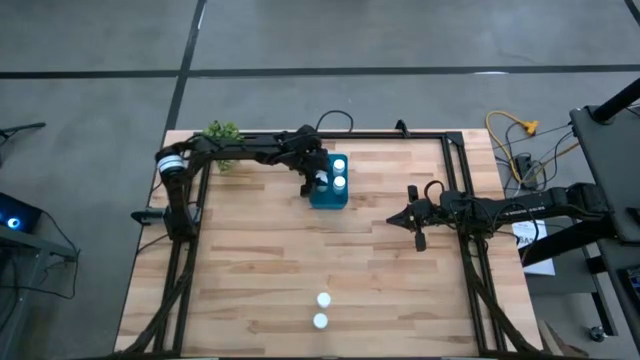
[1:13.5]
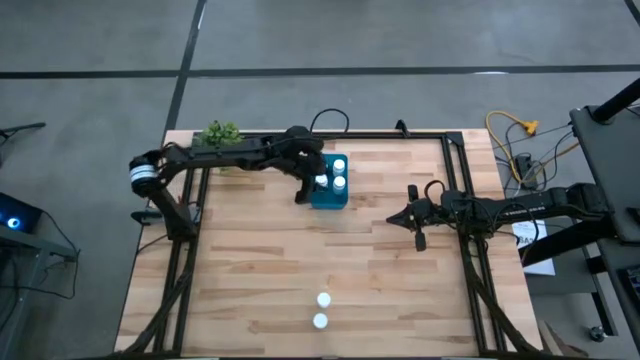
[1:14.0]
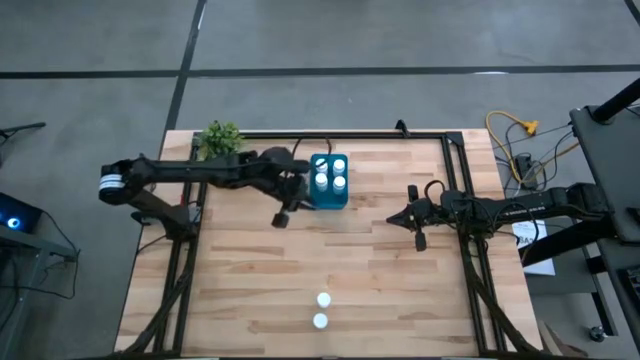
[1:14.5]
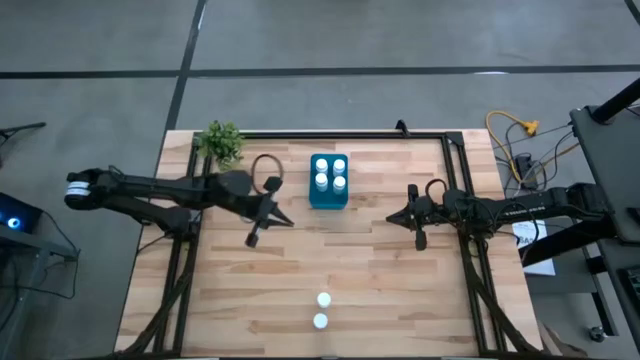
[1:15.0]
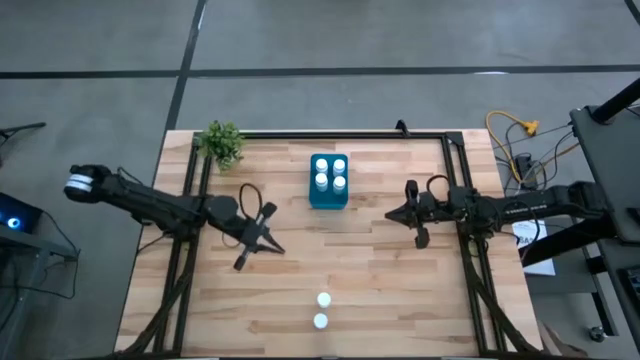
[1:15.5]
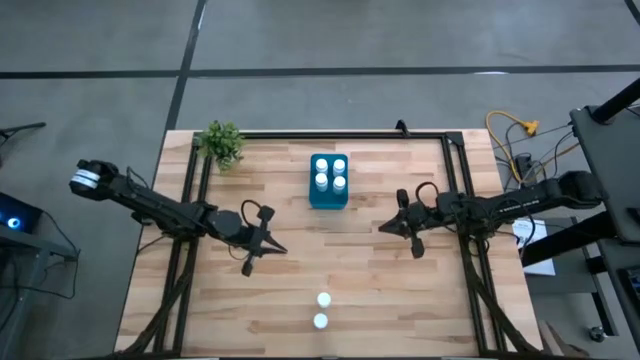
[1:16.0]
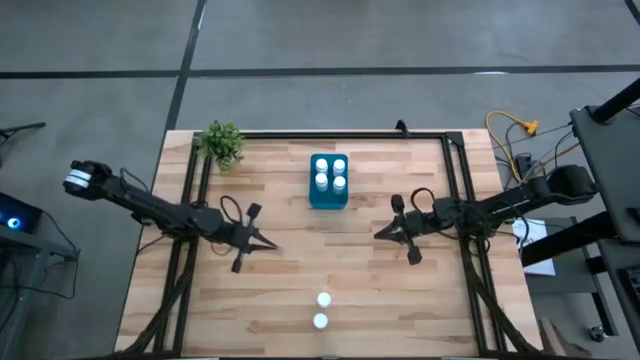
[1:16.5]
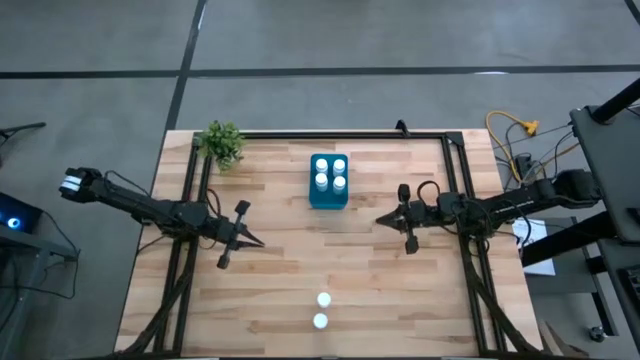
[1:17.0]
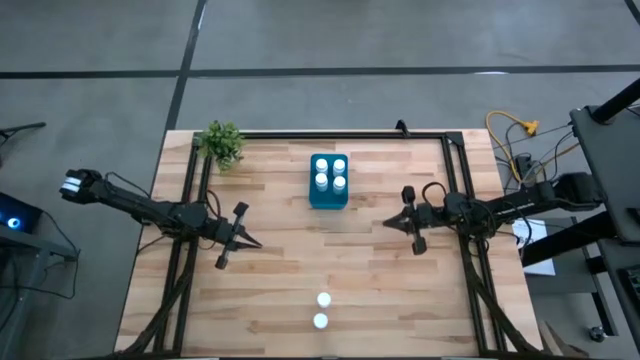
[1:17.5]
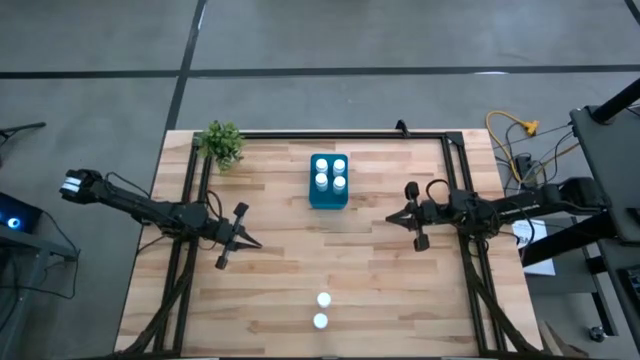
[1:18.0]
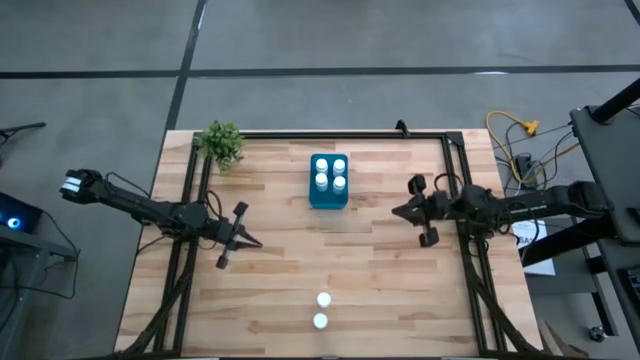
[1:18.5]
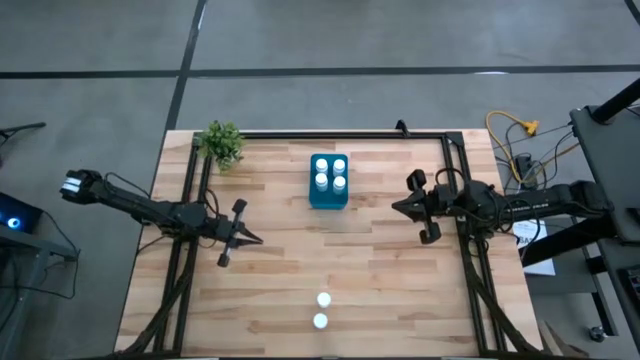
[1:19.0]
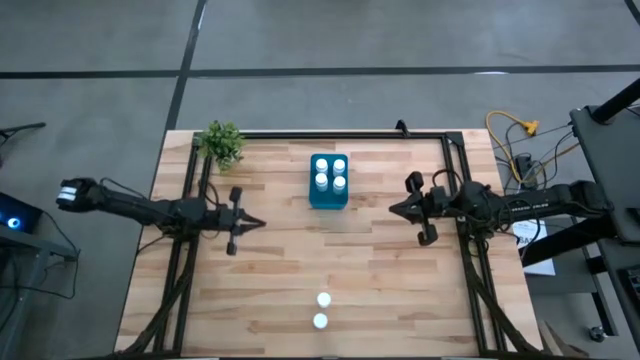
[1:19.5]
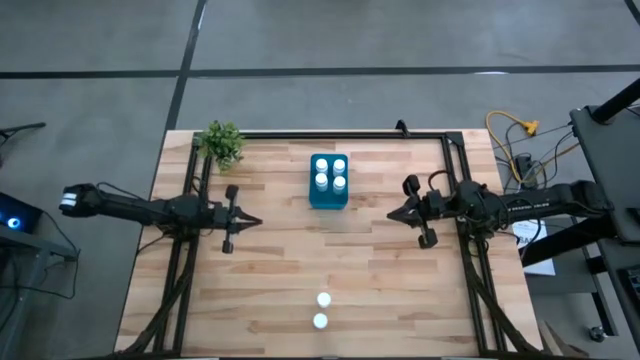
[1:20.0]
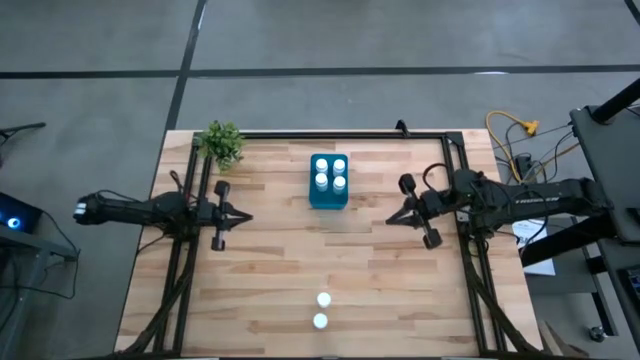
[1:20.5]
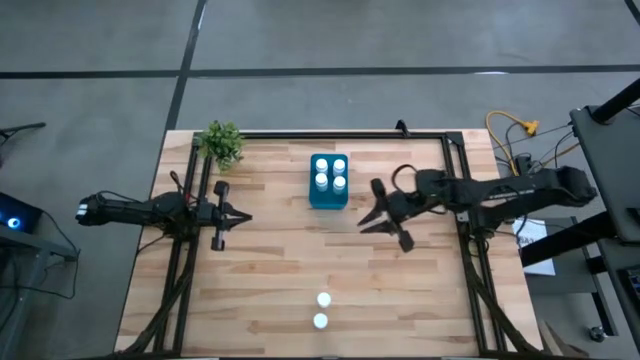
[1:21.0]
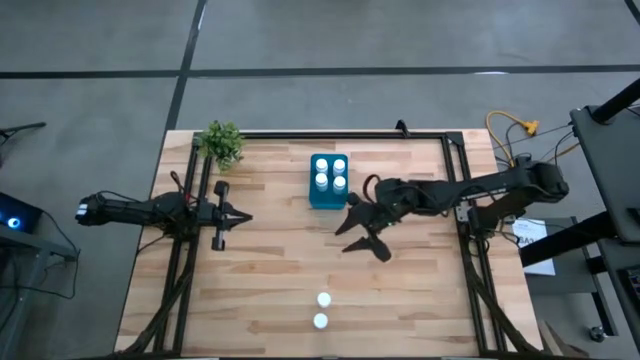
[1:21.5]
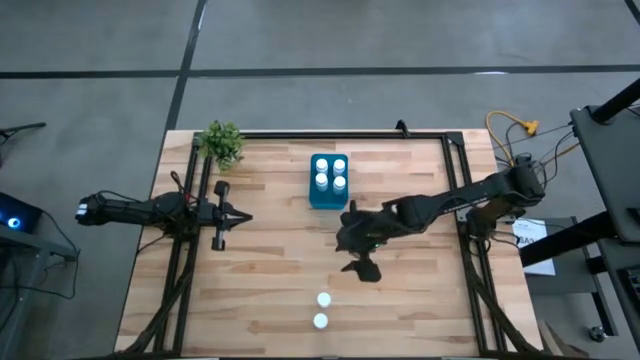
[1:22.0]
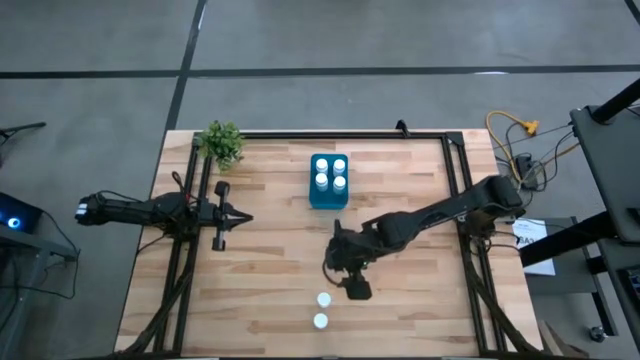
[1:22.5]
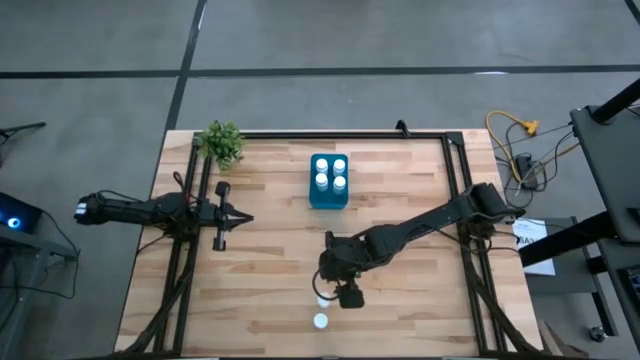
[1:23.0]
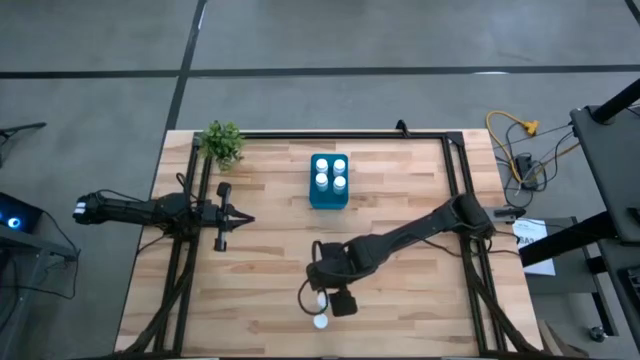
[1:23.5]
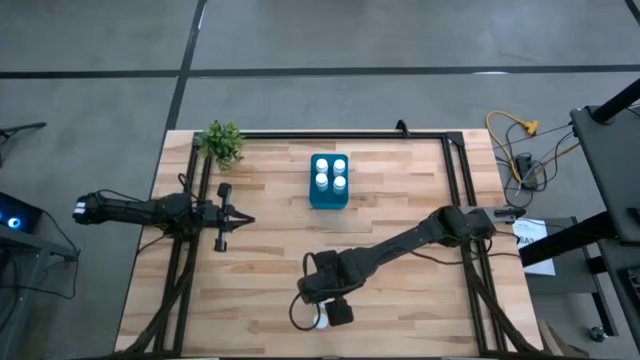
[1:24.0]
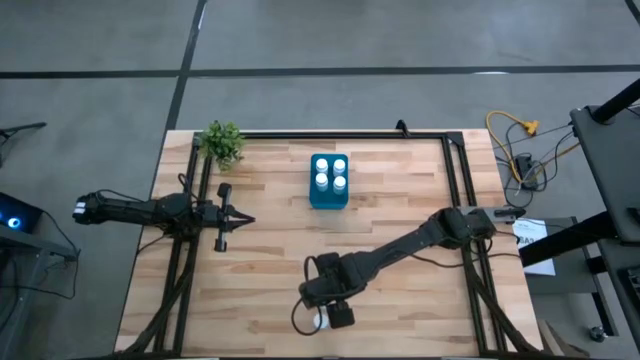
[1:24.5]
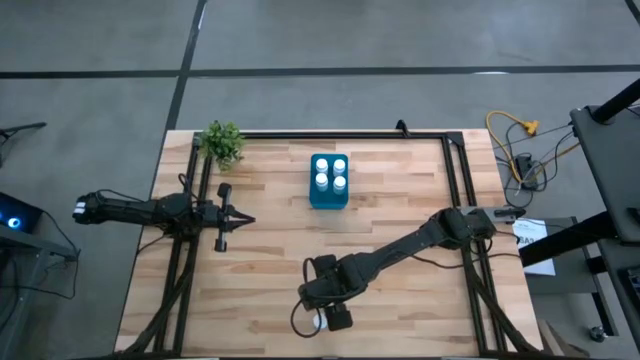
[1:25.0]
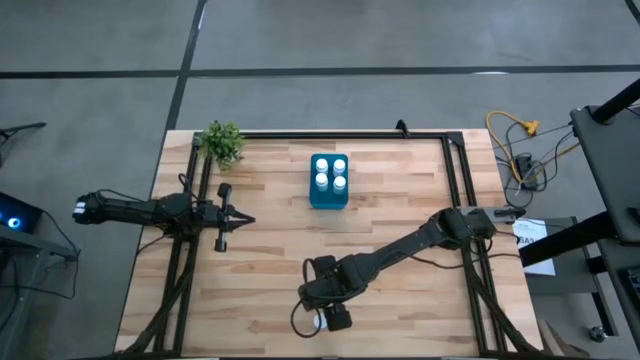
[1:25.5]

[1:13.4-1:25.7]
Task: Pick and place pill bottles into a basket
Put the top white pill bottle into the blue bin

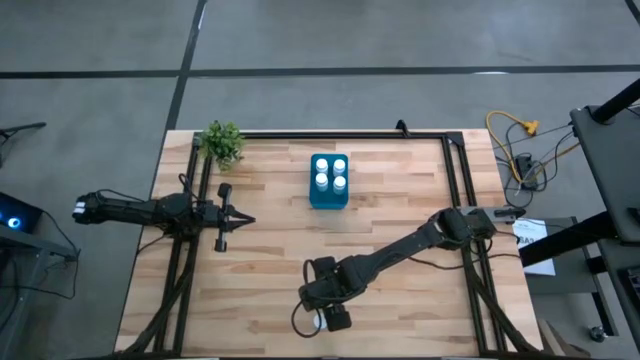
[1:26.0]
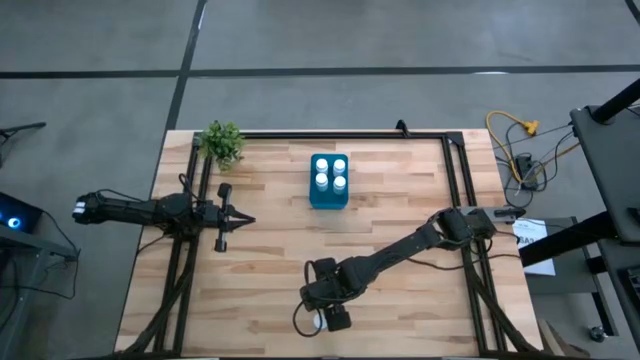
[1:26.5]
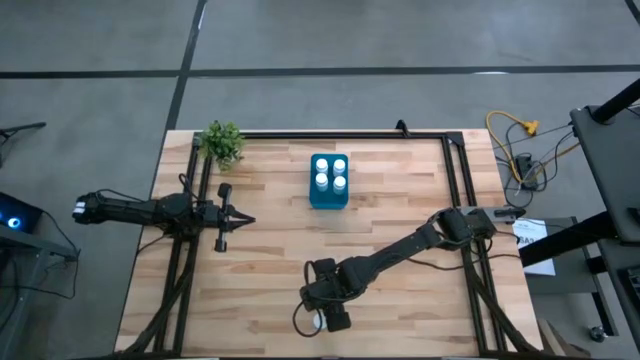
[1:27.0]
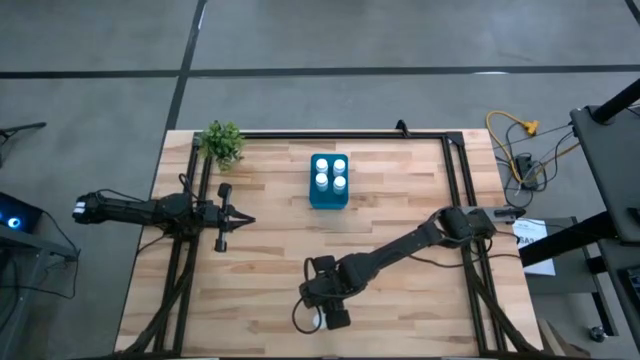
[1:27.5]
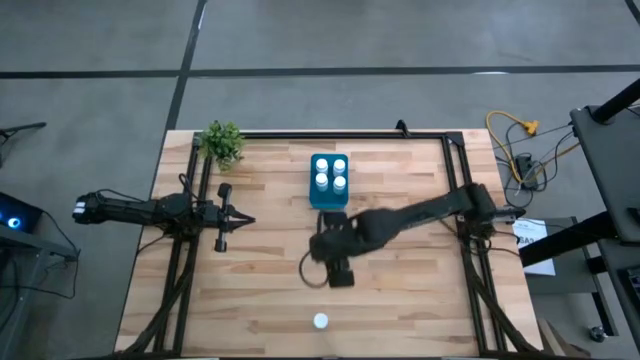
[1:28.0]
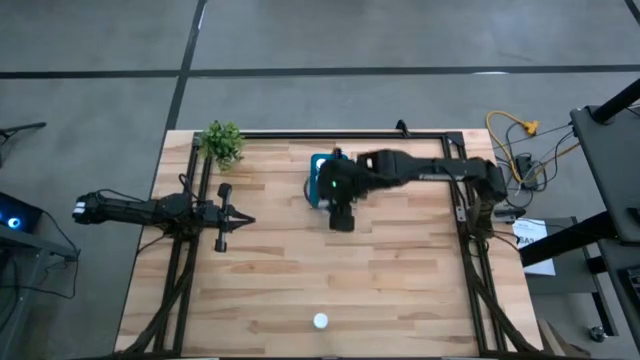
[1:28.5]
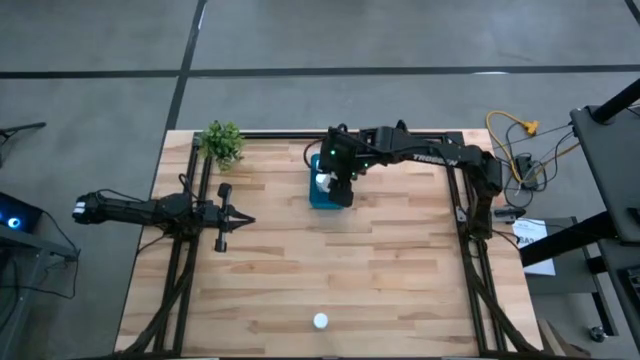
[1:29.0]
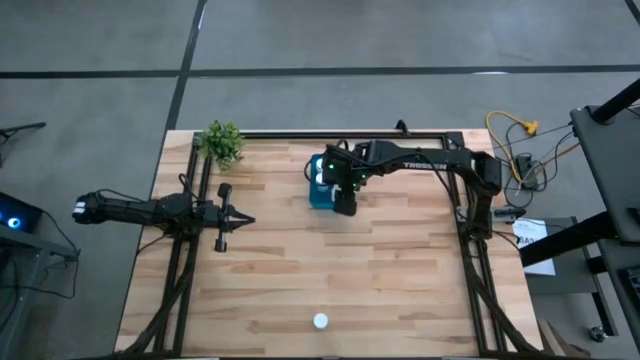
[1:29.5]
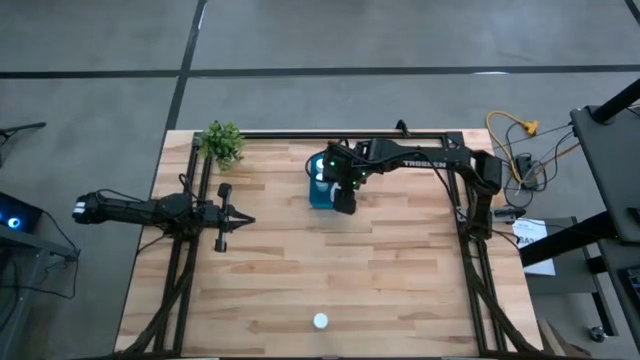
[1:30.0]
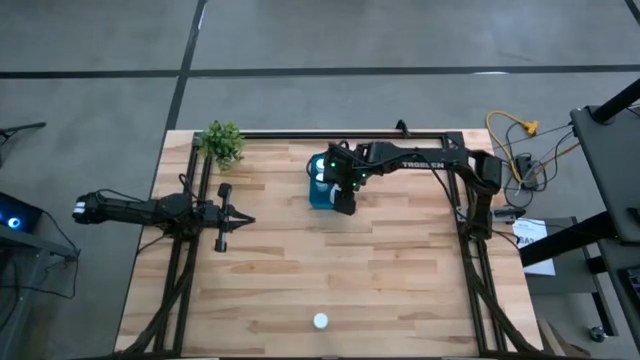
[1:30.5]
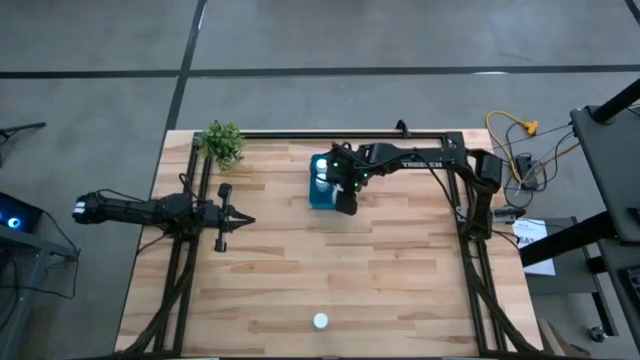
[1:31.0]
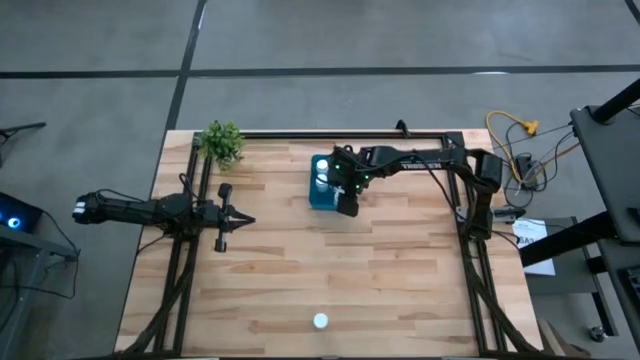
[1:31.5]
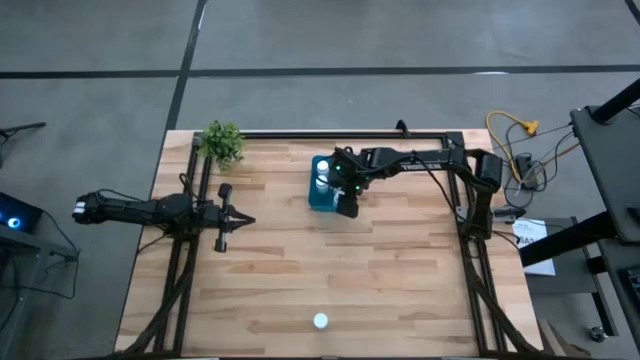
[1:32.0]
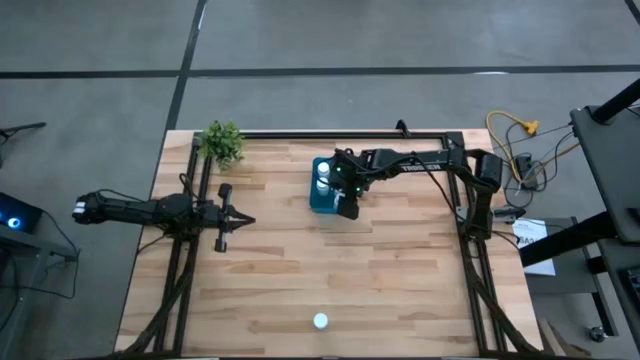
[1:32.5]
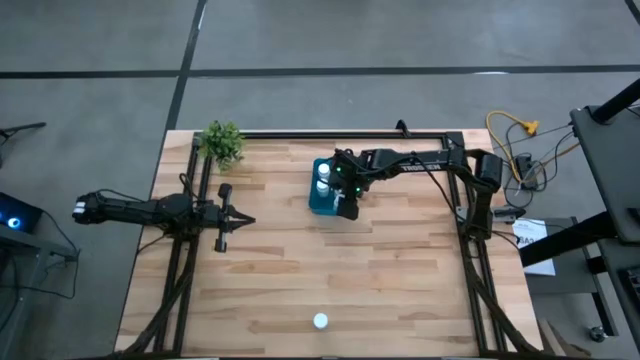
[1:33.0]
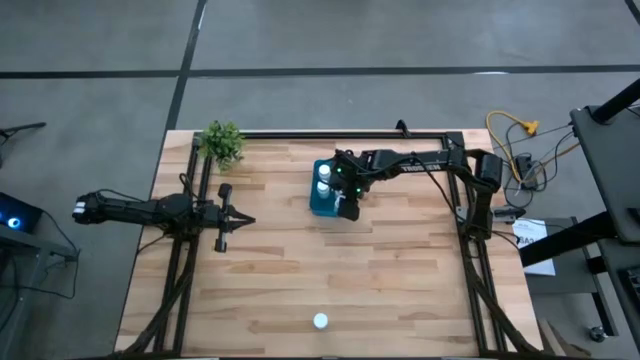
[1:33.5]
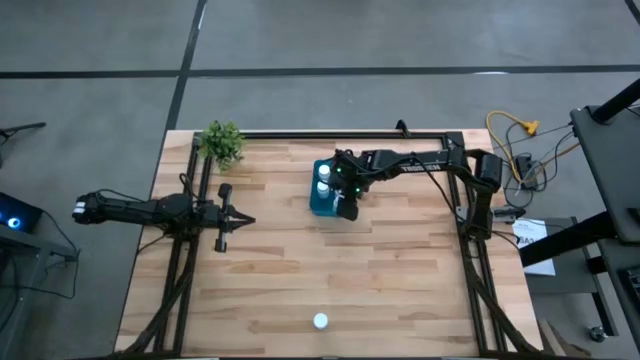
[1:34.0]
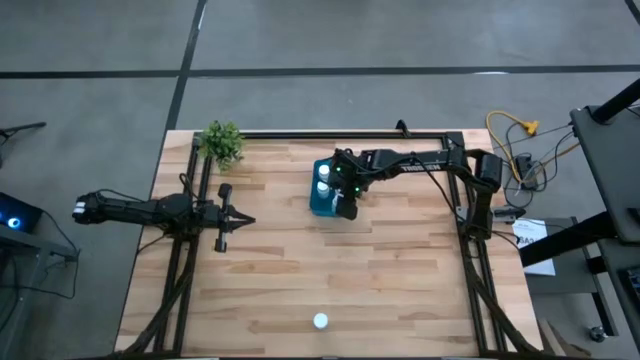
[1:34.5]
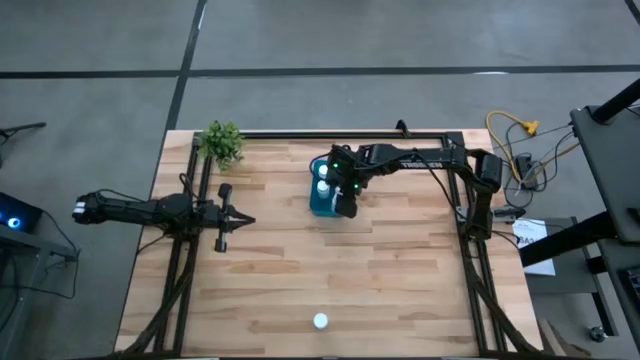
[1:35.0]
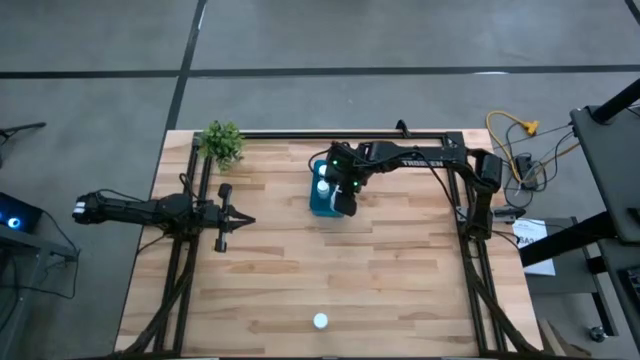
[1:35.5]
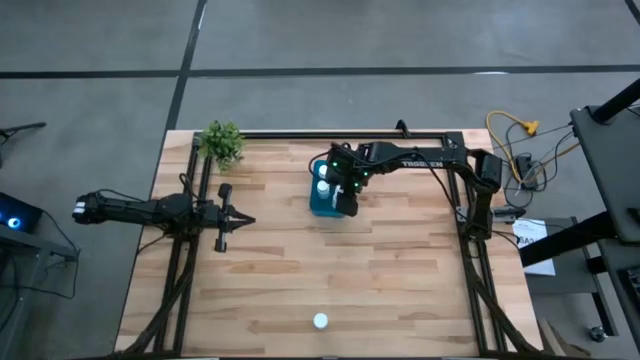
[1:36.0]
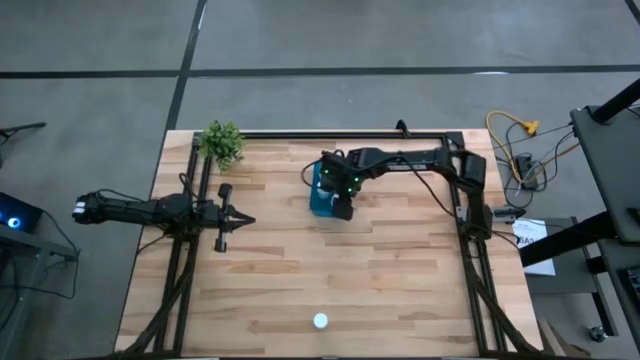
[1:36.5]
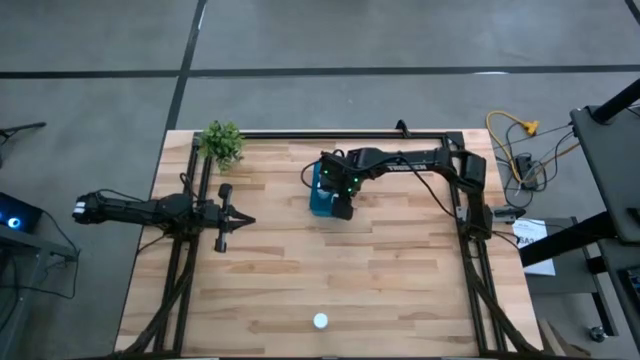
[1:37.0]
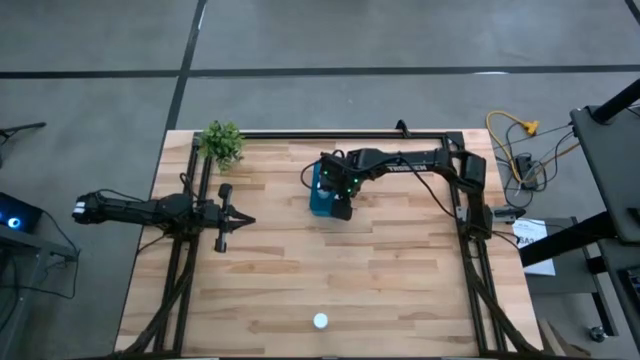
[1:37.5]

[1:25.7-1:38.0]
Put the top white pill bottle into the blue bin
